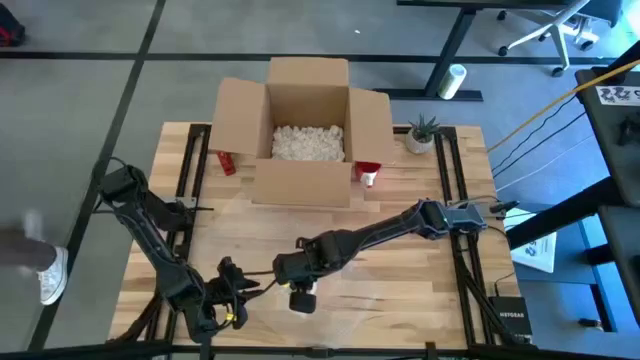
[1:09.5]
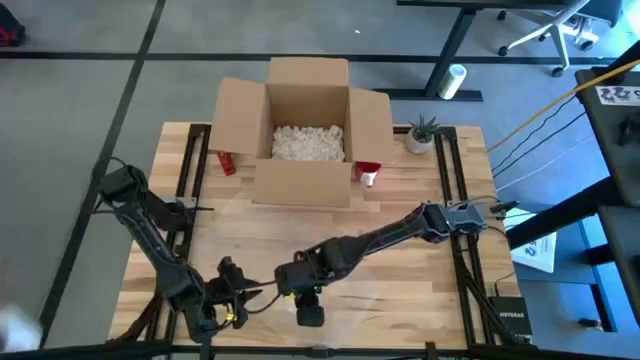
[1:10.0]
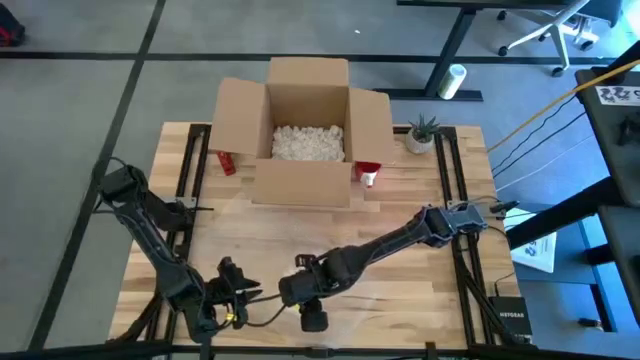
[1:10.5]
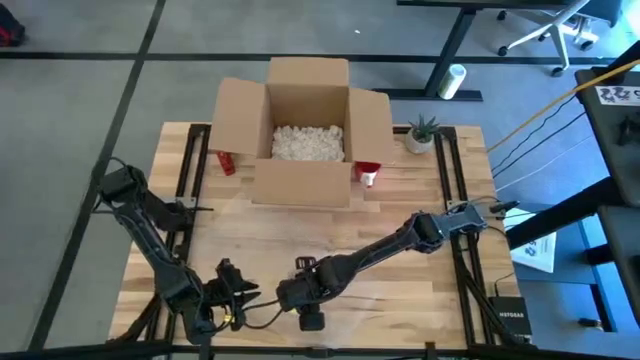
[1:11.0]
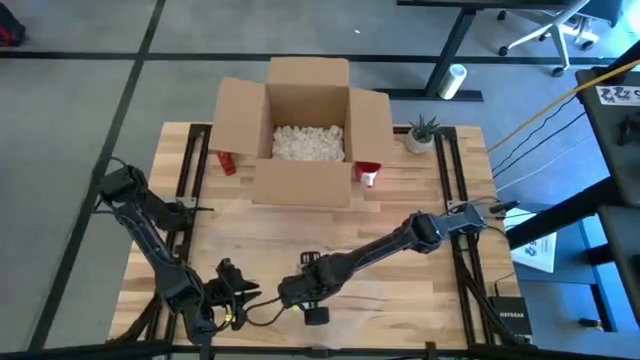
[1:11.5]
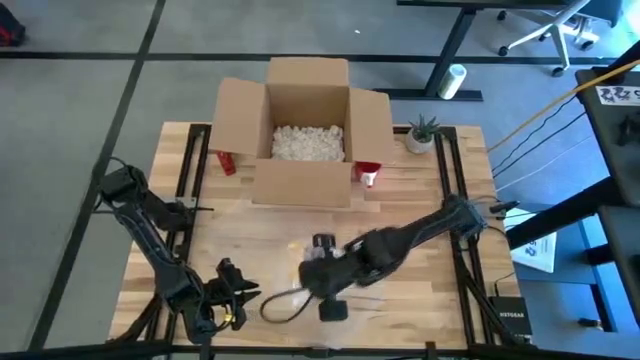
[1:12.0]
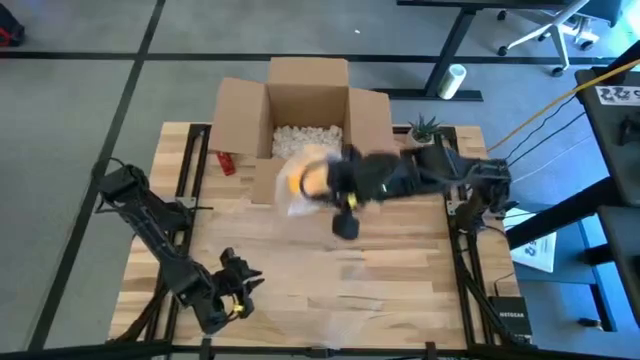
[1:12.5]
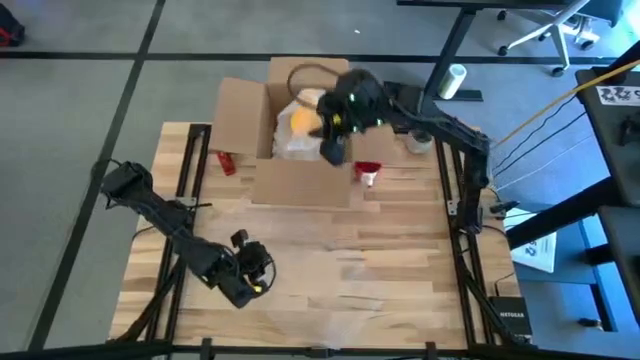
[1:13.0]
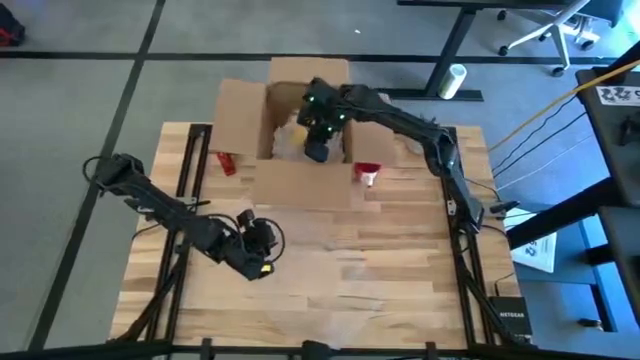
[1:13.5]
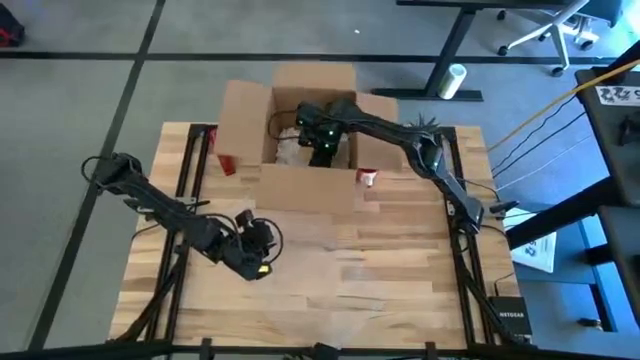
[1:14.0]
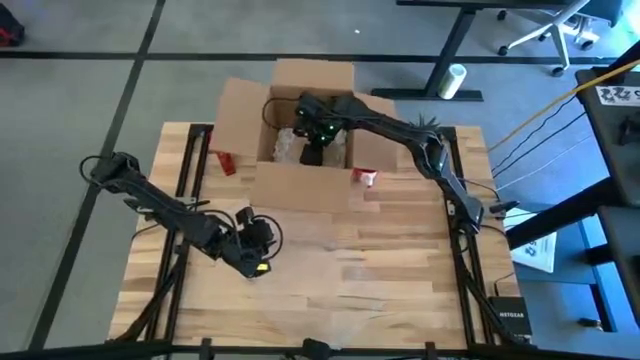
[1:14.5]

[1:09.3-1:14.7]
Task: wrap mug
Put the wrapped yellow mug into the cardboard box

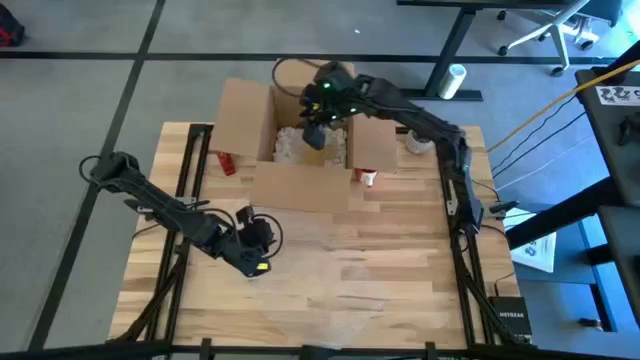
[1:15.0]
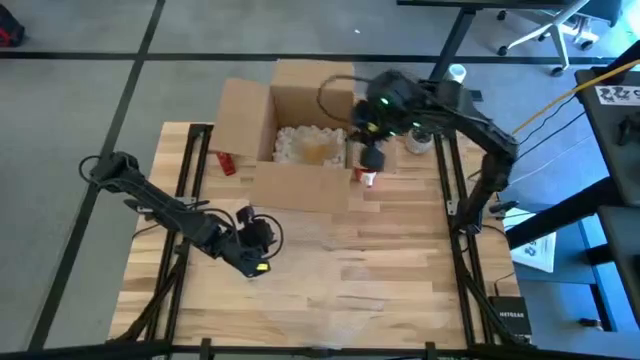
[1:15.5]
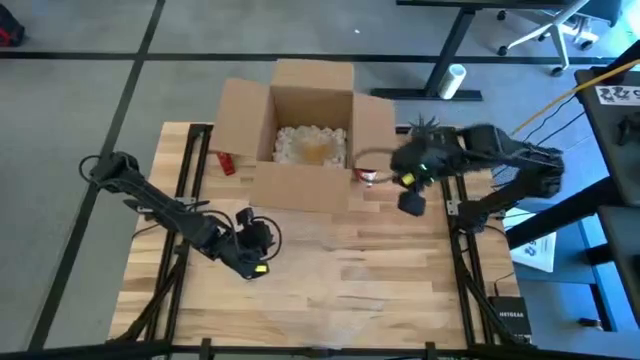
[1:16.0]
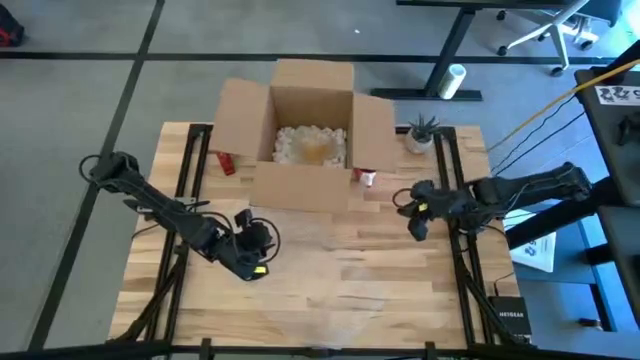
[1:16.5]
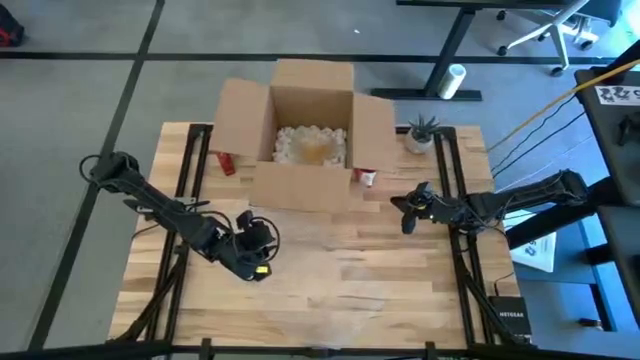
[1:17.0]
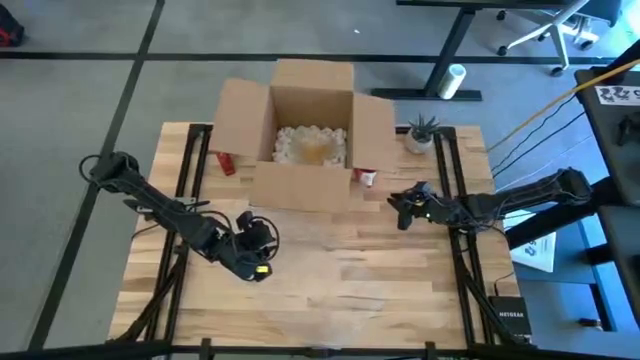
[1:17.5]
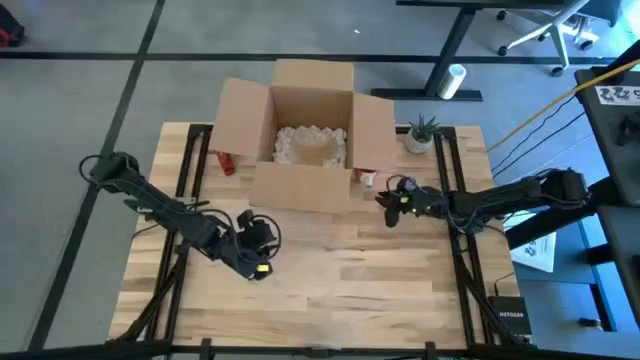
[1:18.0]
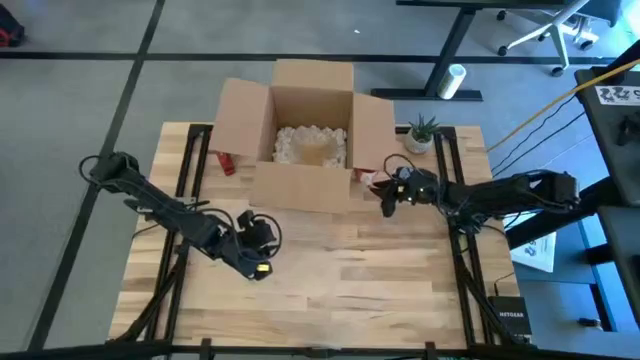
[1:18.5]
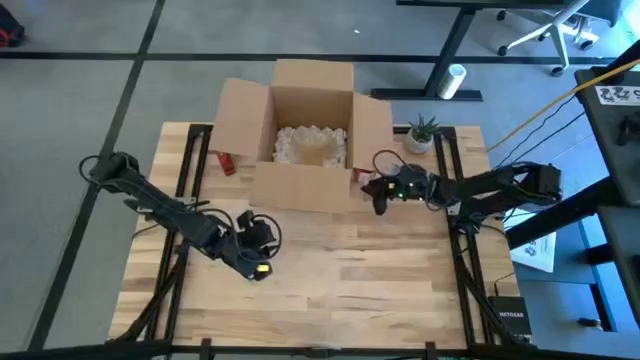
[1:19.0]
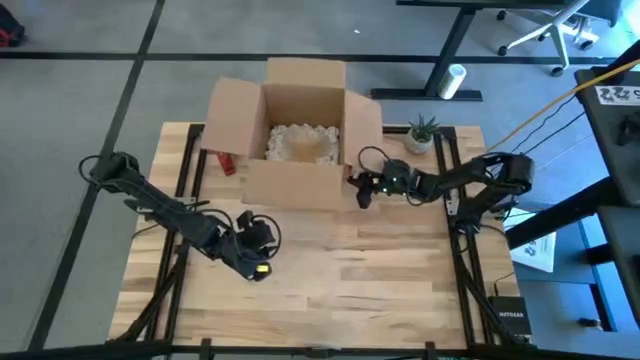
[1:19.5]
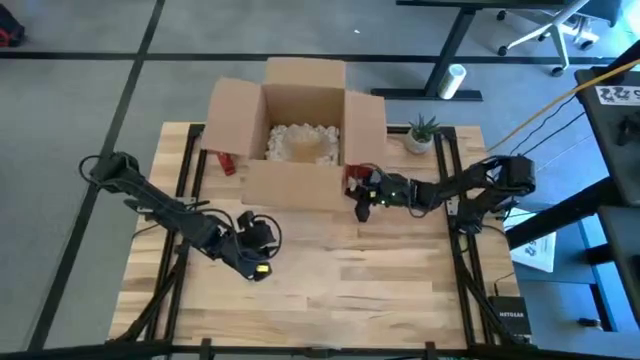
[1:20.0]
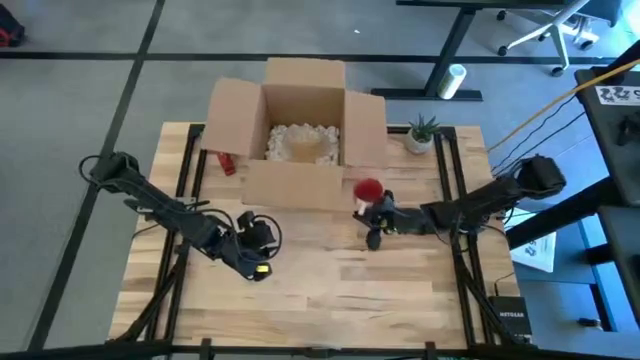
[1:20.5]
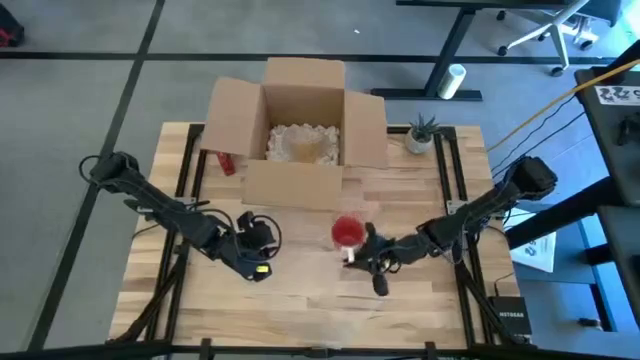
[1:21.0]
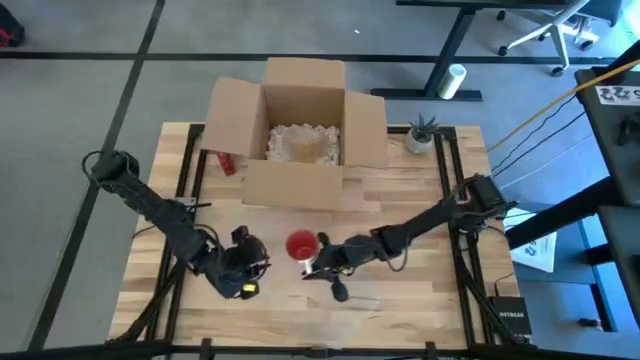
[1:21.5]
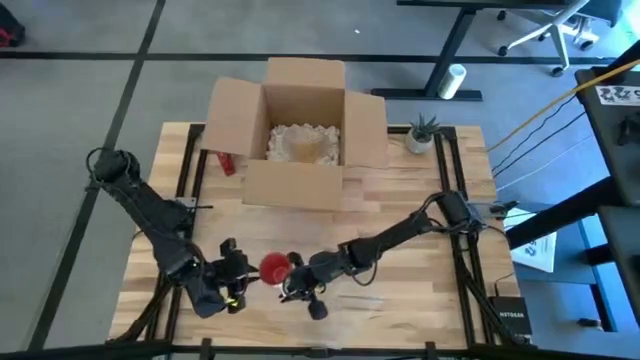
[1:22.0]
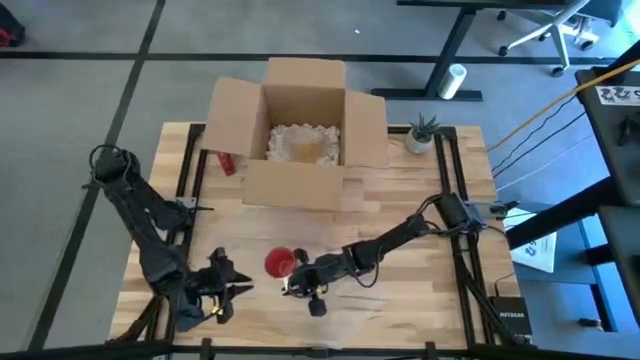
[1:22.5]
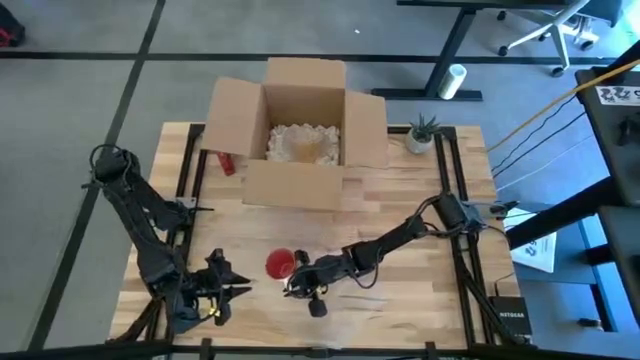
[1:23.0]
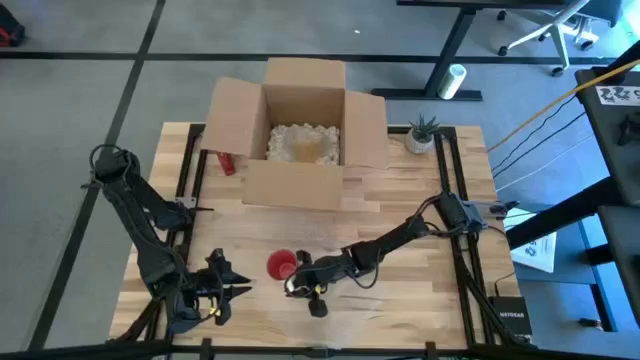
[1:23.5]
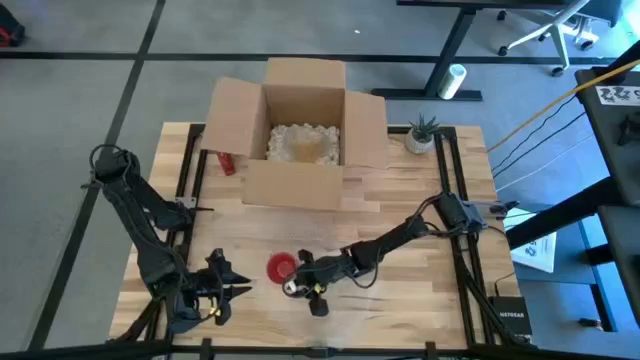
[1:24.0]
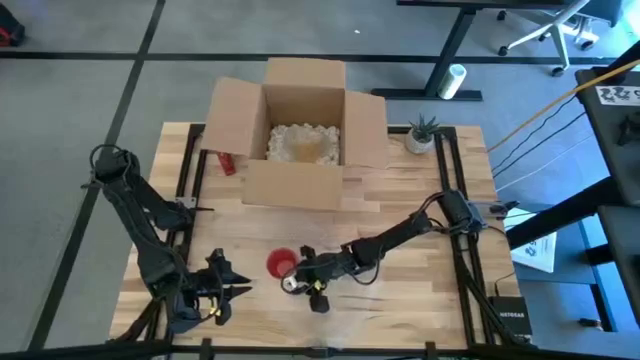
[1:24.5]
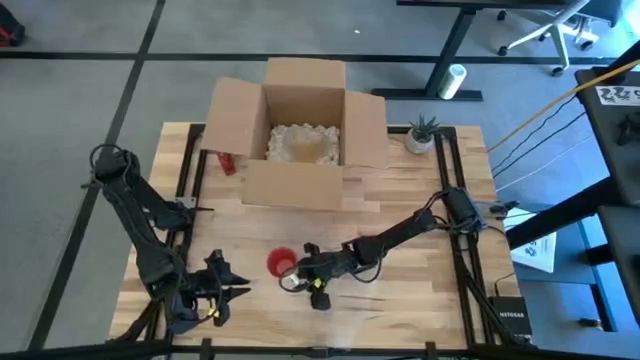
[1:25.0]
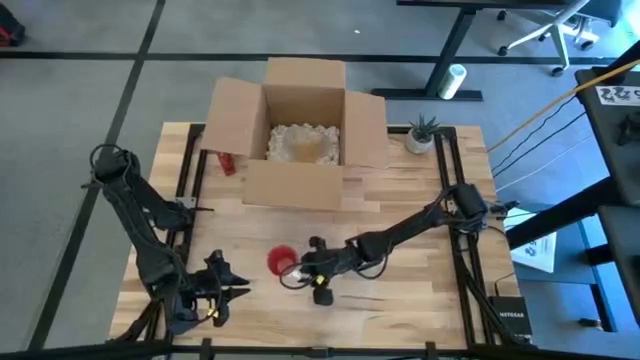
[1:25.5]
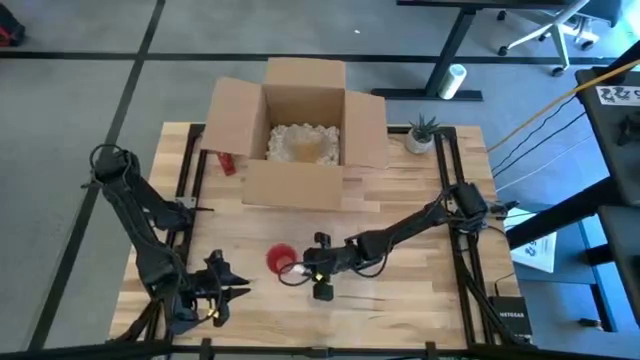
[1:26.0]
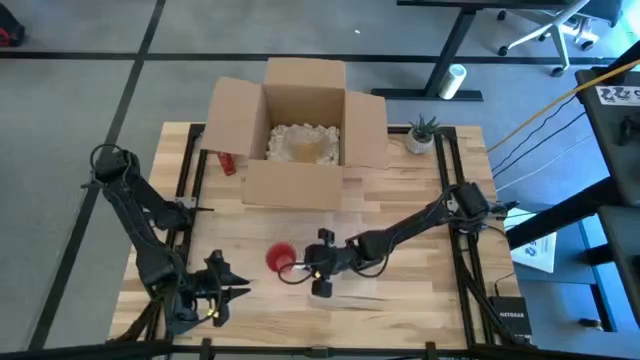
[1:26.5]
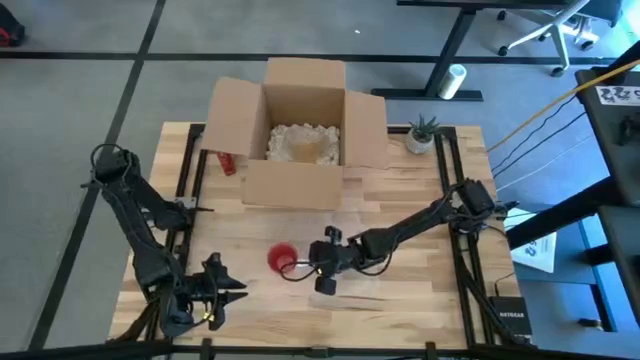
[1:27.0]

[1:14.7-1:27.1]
Put the red mug on the bubble wrap

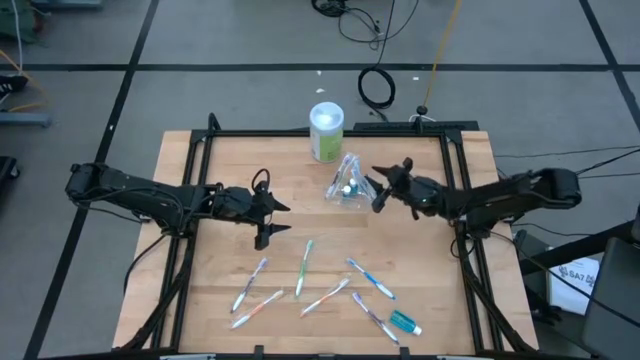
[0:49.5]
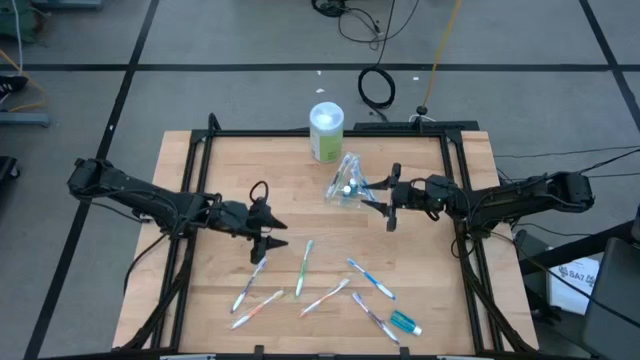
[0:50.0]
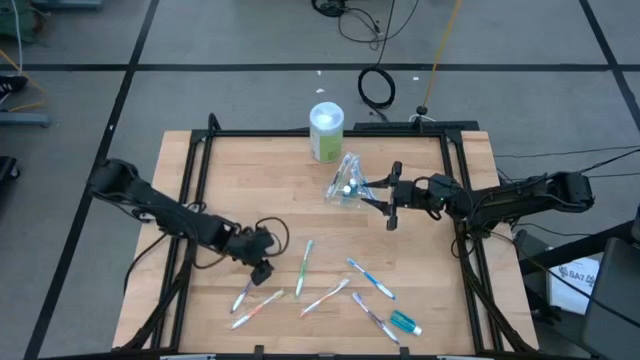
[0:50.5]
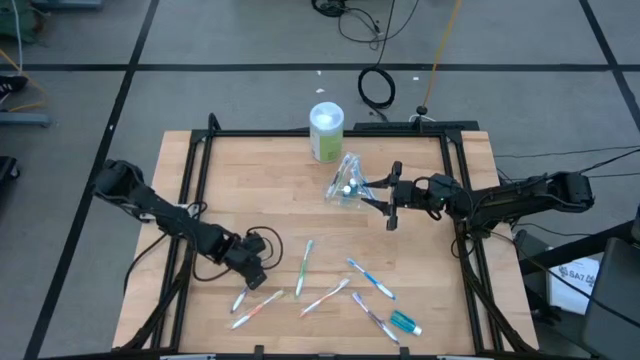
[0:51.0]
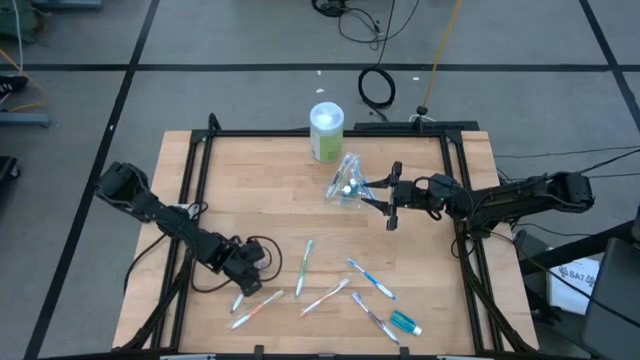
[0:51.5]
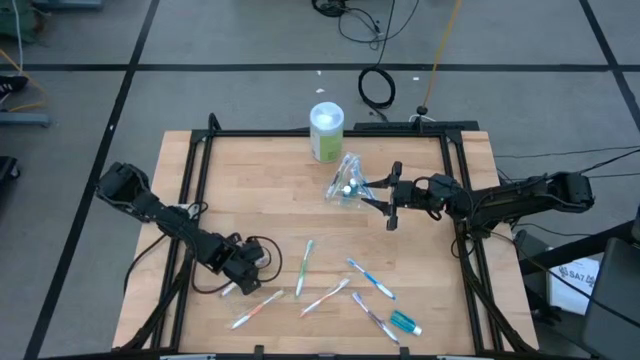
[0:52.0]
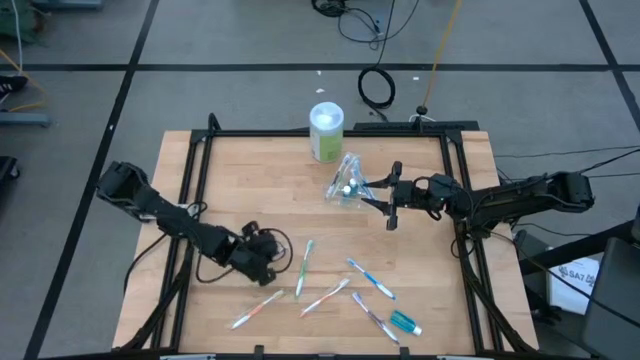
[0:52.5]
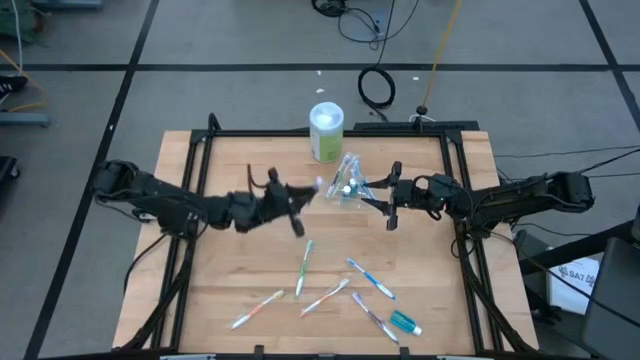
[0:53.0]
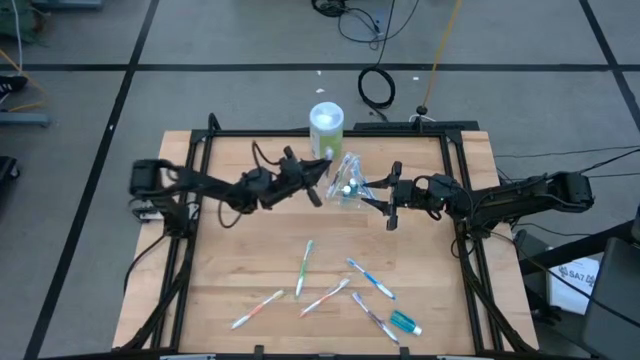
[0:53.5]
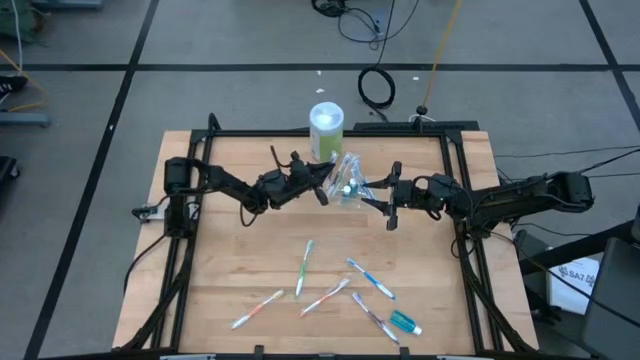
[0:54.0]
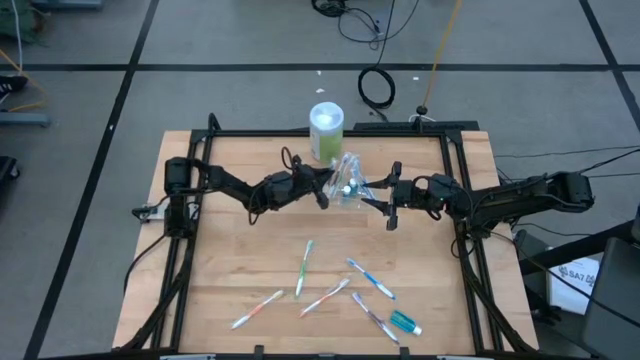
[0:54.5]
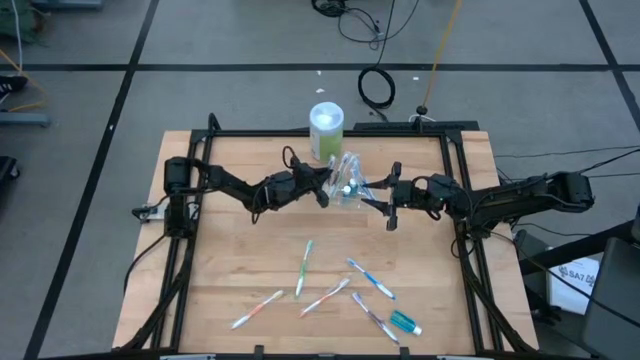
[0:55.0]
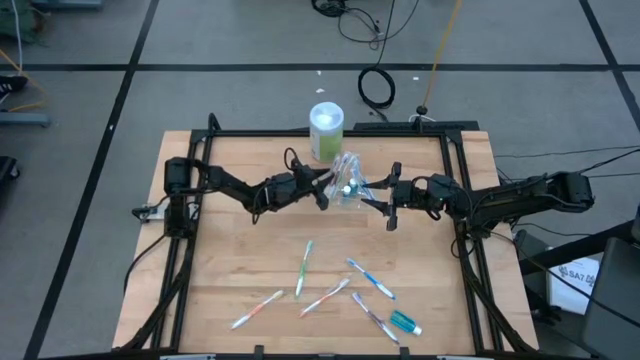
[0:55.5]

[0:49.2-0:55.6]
Task: Pick & Place toothbrushing station
Put the left violet toothbrush into the transparent organizer
